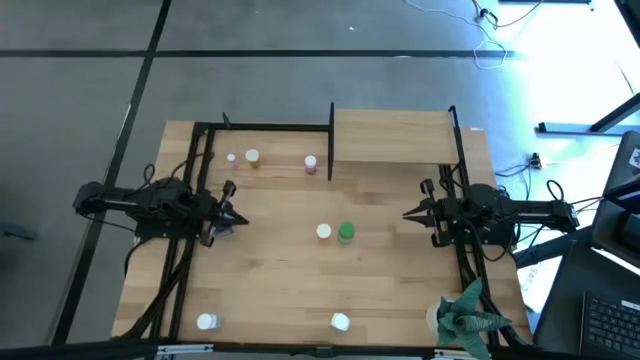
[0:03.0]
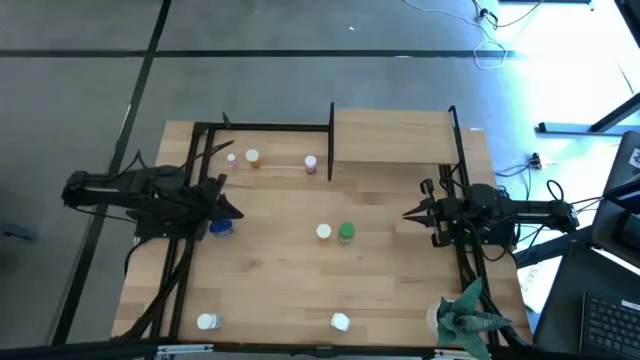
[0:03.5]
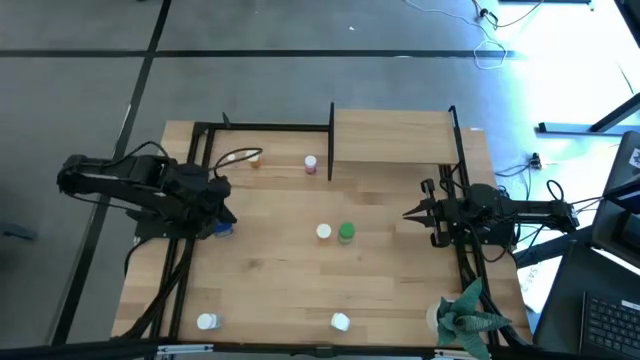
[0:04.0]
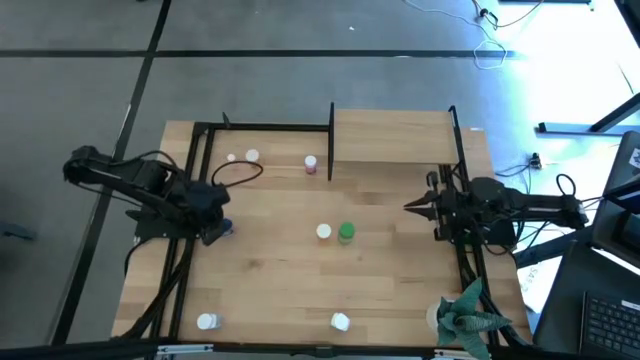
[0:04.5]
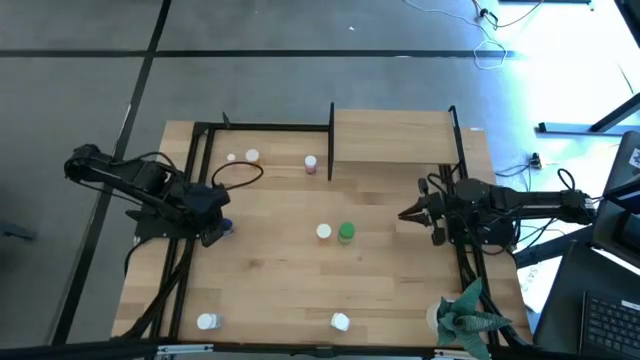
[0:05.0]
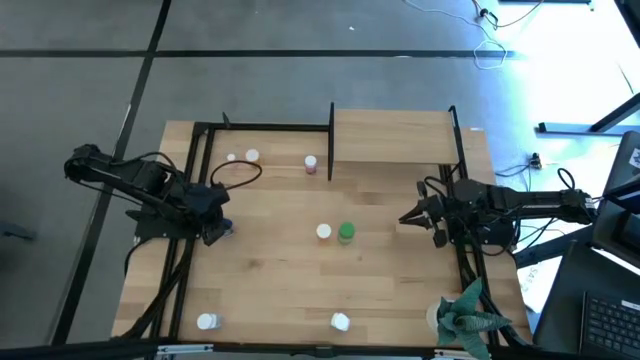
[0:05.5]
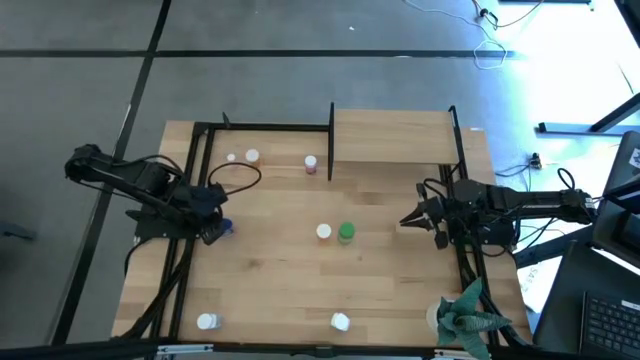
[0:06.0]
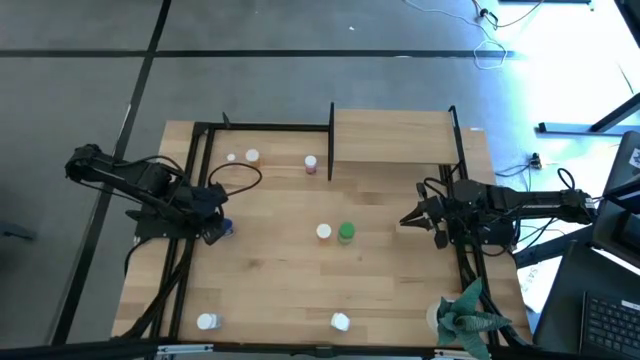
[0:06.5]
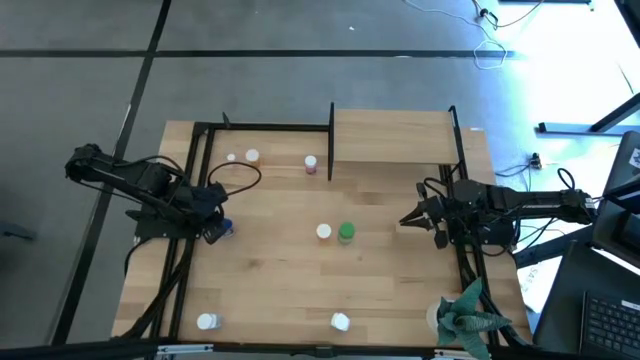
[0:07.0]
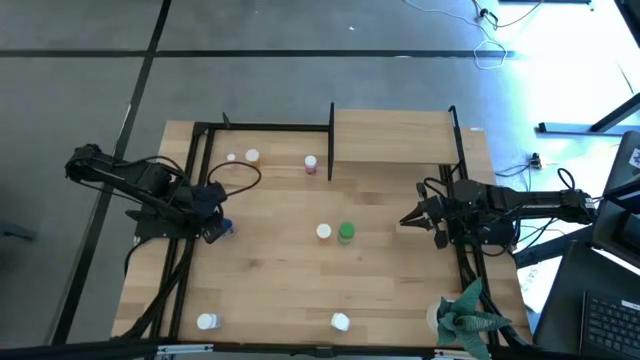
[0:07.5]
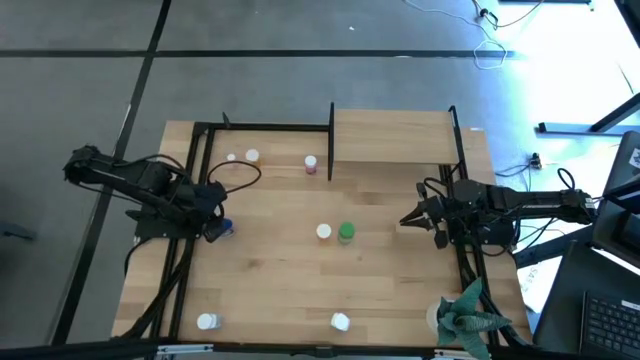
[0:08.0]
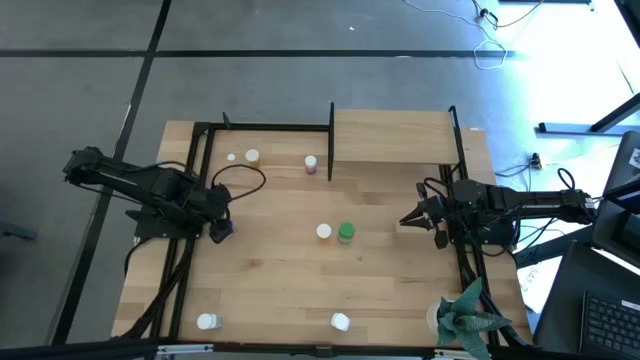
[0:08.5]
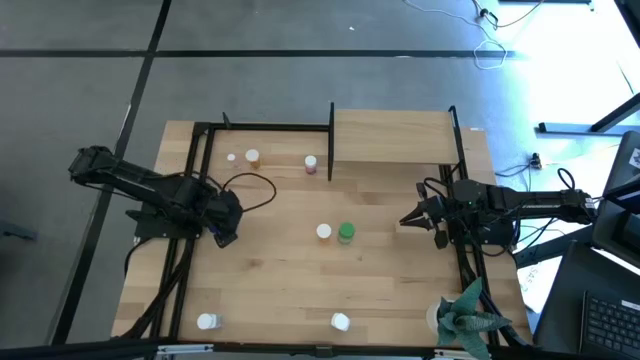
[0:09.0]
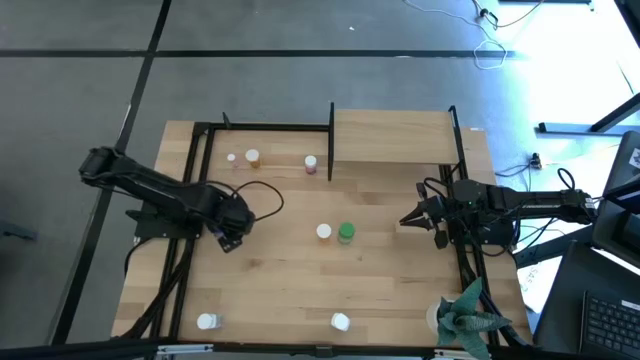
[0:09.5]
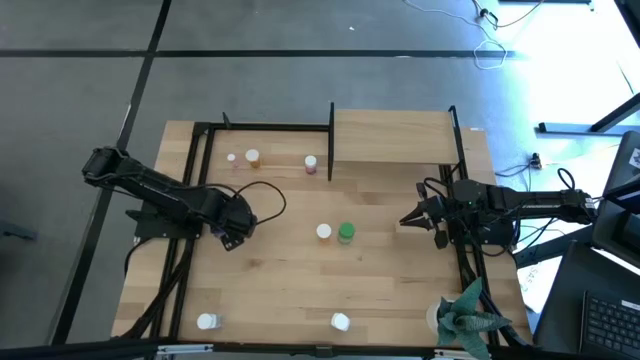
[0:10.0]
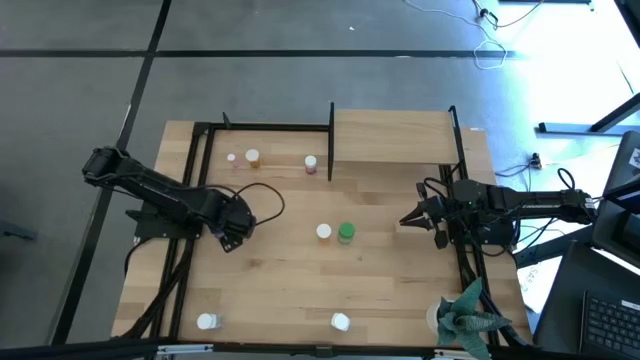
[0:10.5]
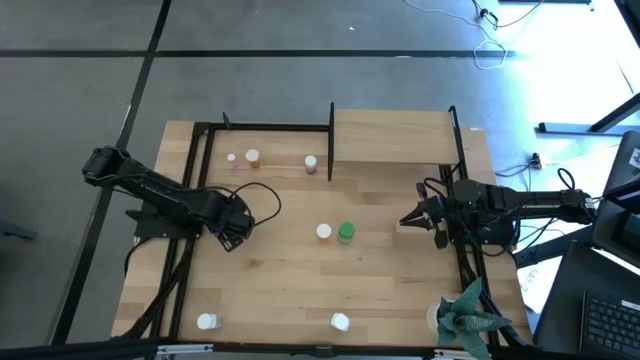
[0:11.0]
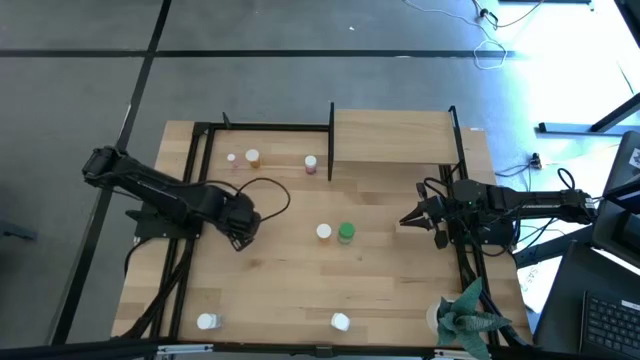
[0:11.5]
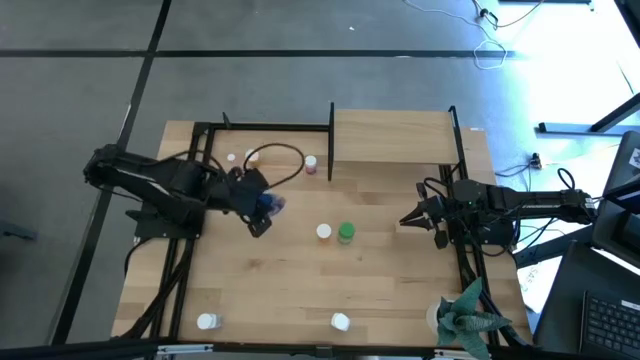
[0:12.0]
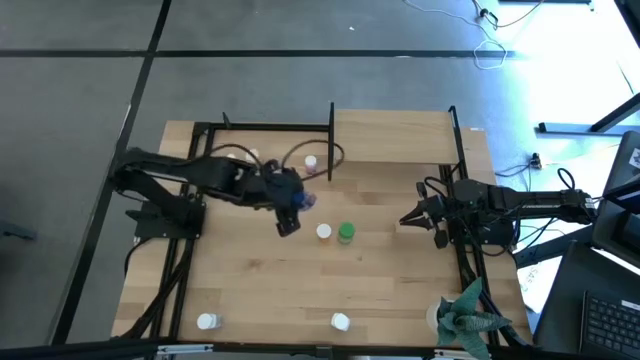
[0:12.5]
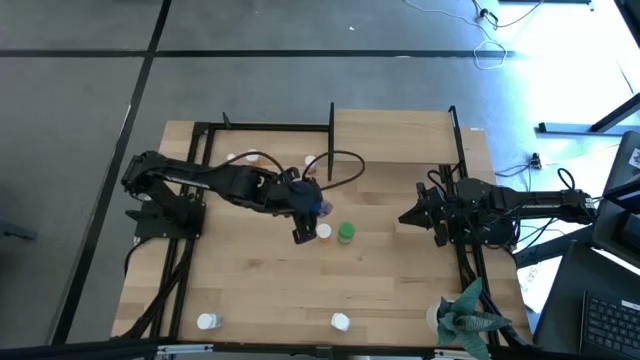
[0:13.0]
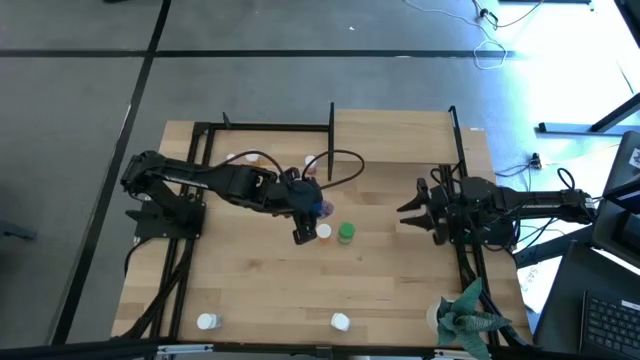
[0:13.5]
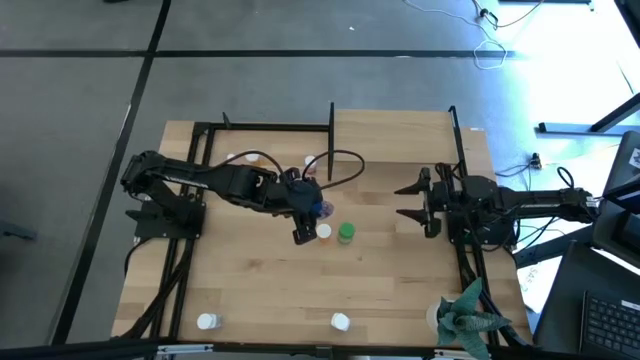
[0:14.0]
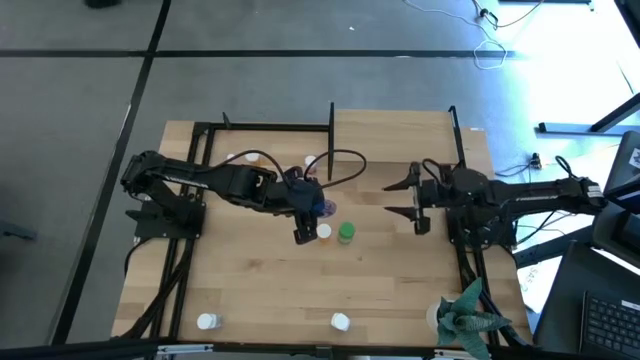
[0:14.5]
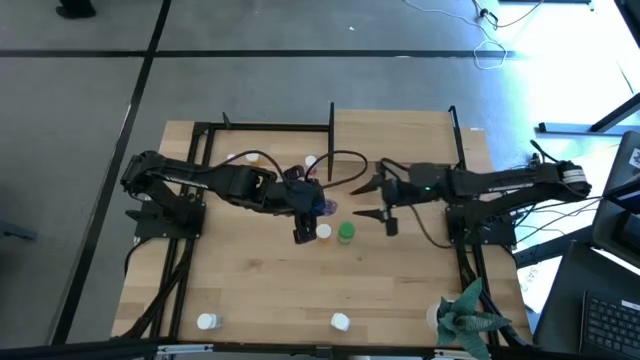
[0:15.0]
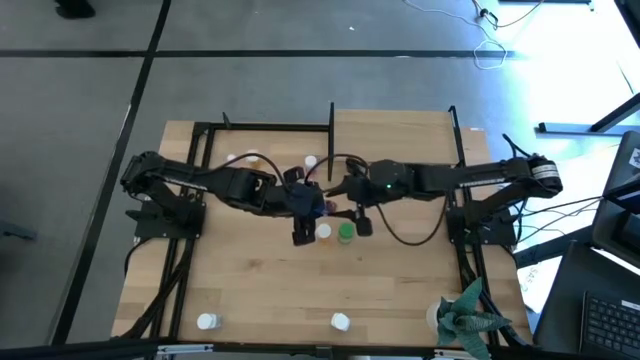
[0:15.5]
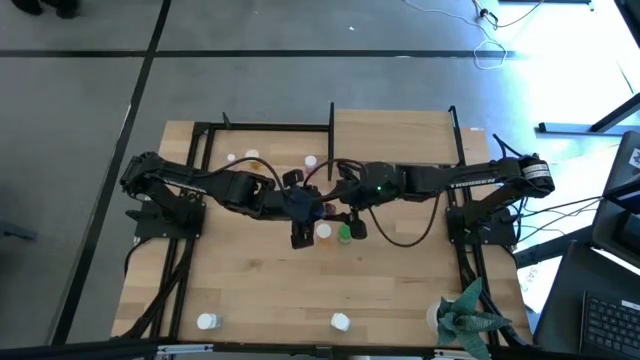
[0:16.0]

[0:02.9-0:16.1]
Task: Pick and place medicine bottles onto shelf by color
Put the blue medicine bottle on the shelf

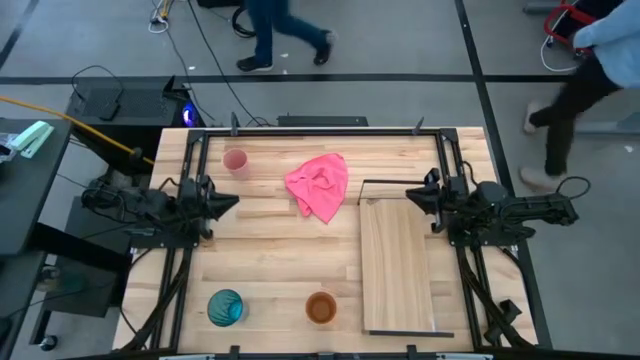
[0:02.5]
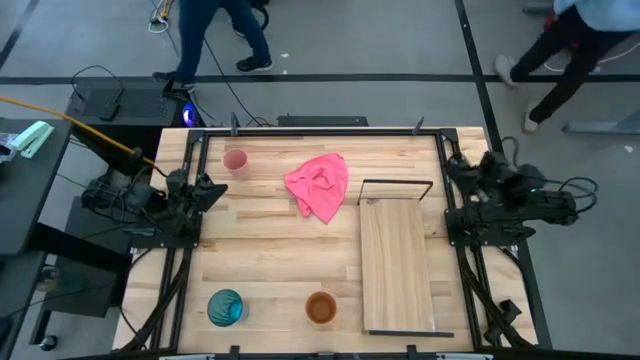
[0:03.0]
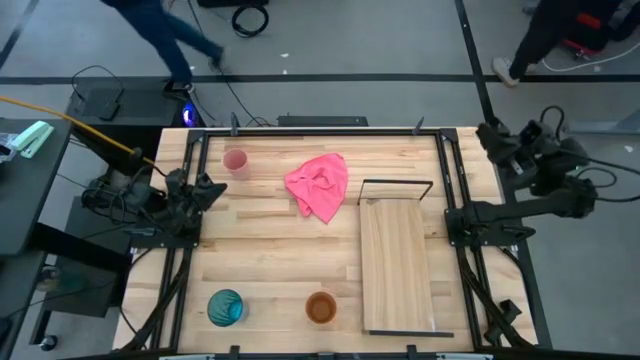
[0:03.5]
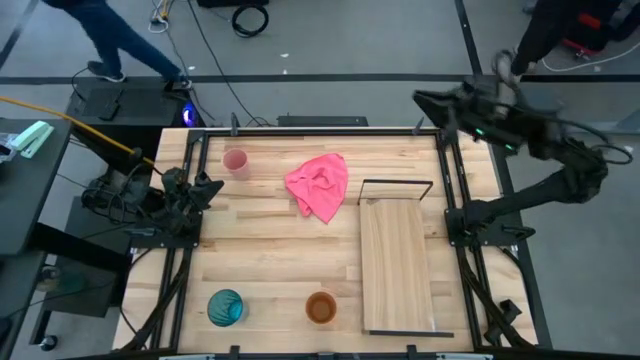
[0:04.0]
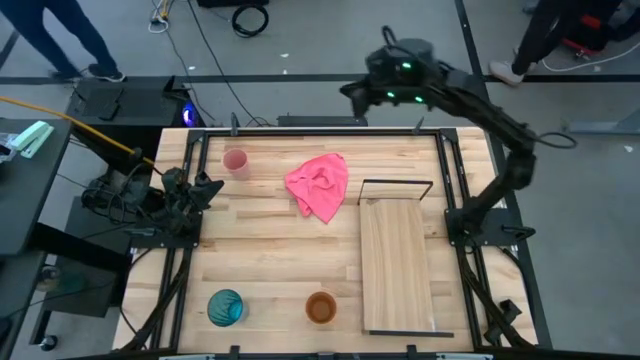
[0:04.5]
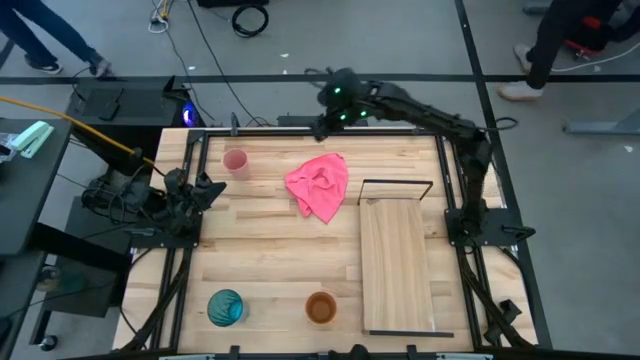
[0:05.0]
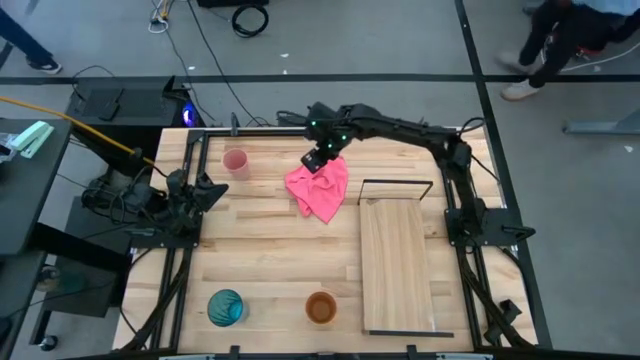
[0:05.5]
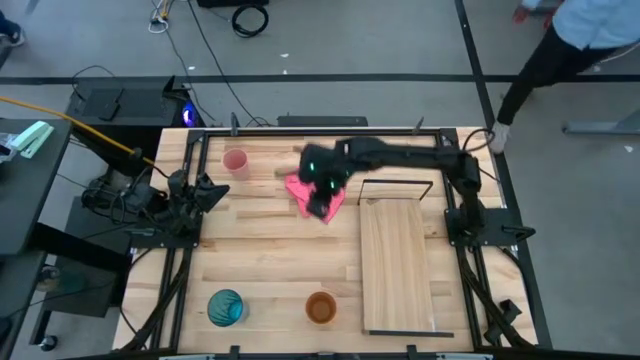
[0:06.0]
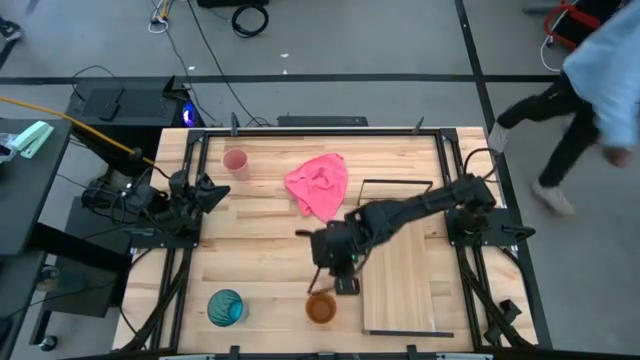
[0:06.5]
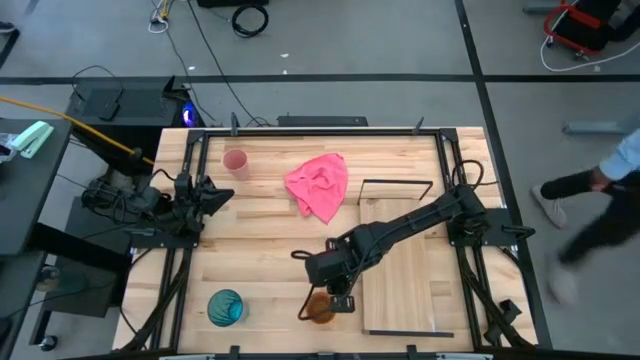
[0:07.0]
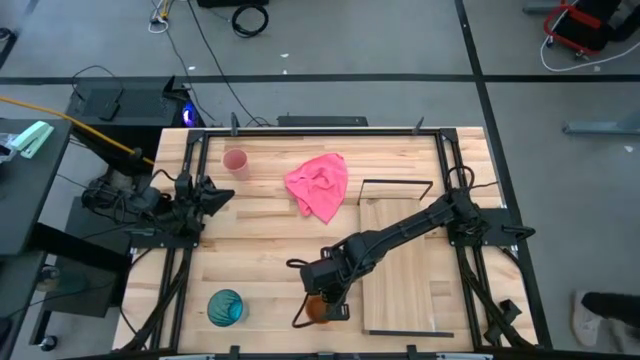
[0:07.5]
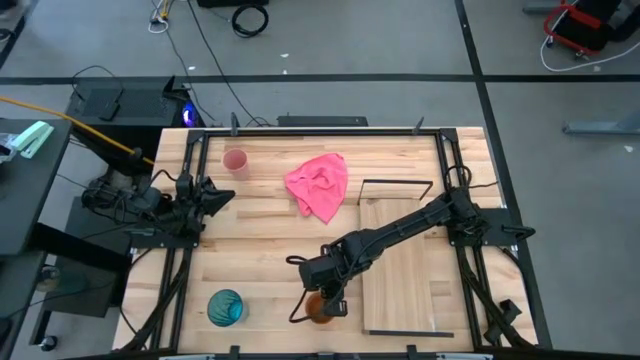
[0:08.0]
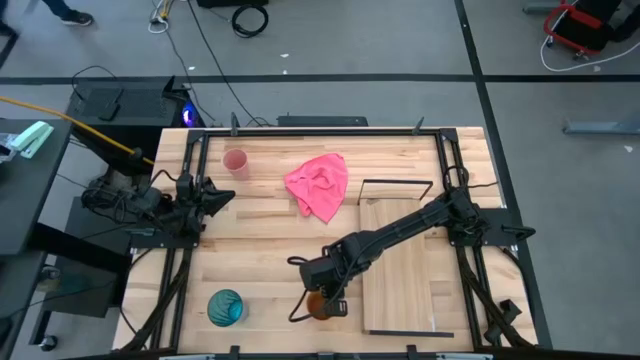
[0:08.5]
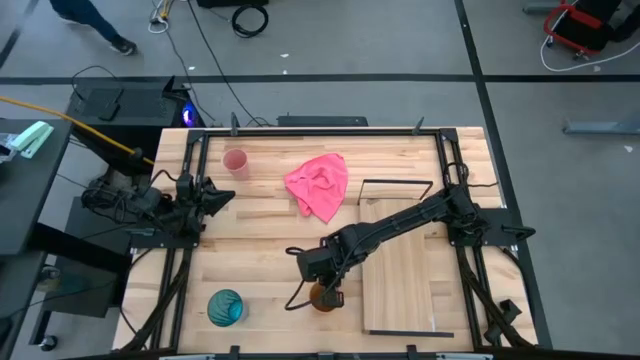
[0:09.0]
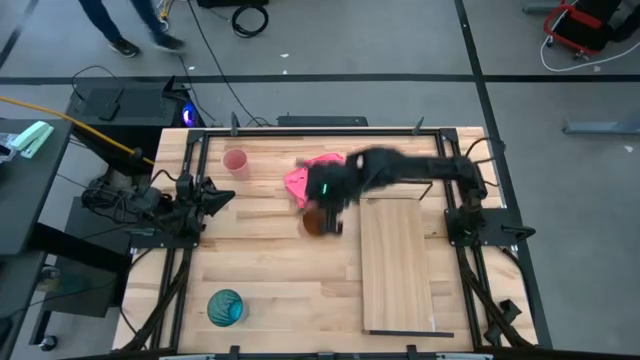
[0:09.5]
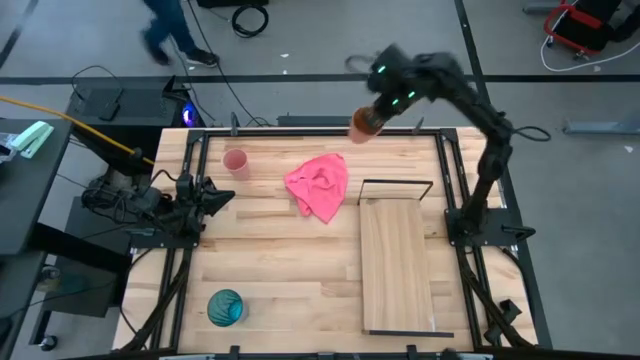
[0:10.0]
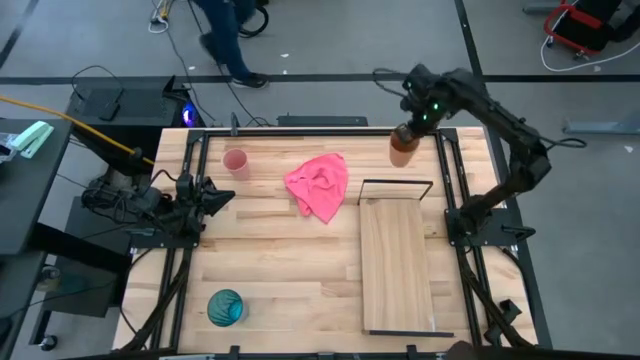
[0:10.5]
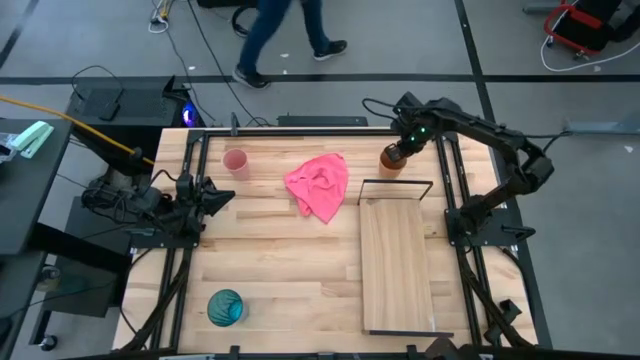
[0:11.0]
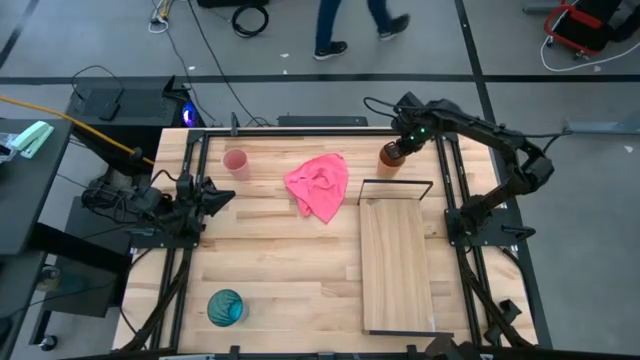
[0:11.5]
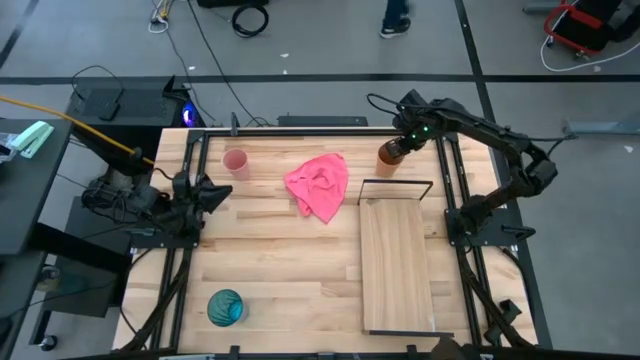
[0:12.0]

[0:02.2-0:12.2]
Task: Stack small to large cups/mugs on shelf
Move the orange cup to the top right of the table
